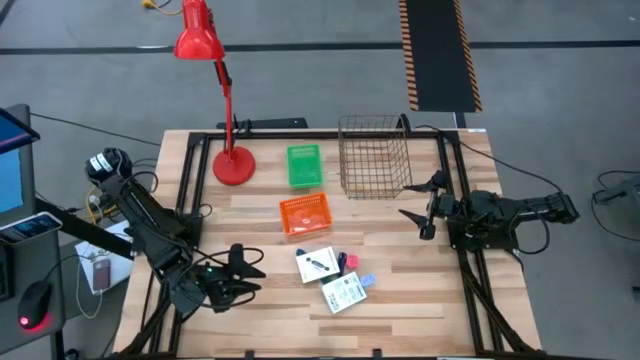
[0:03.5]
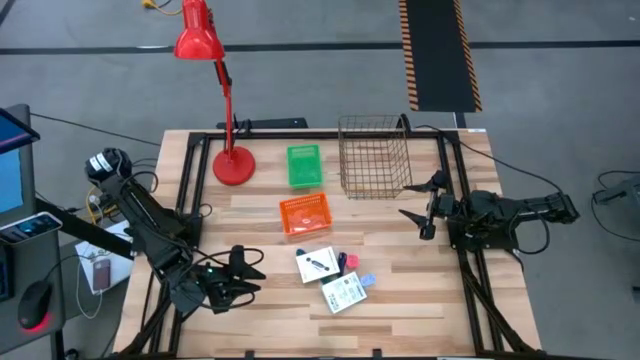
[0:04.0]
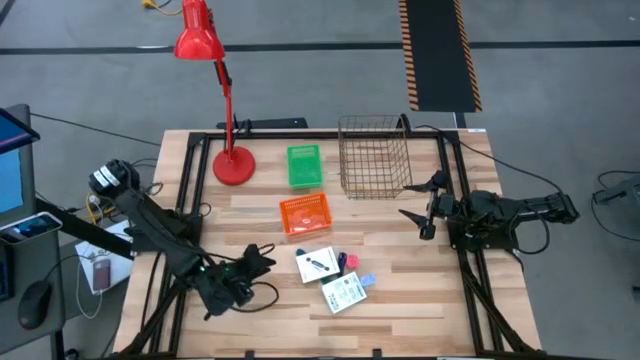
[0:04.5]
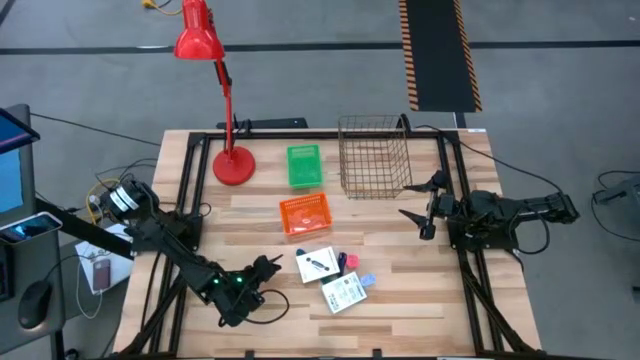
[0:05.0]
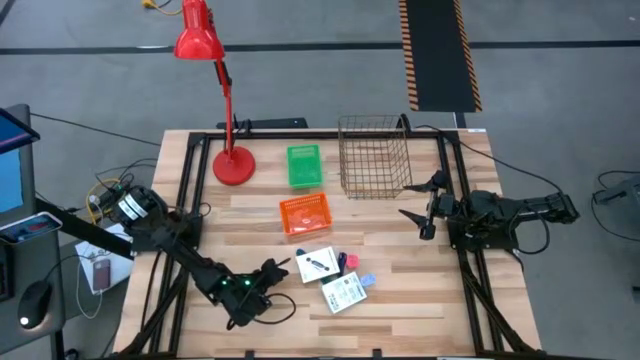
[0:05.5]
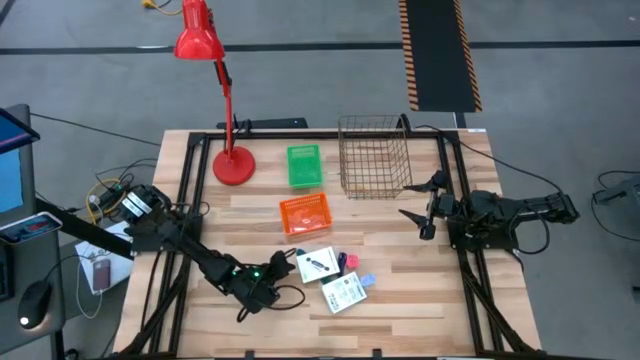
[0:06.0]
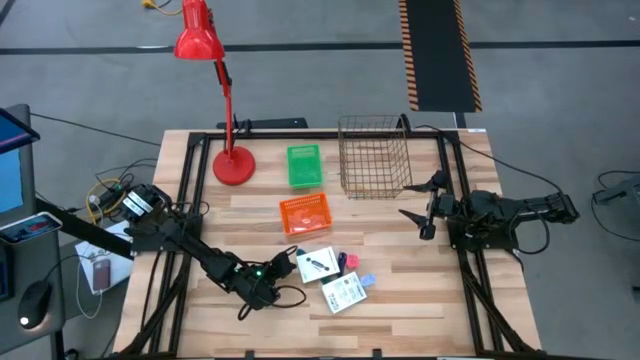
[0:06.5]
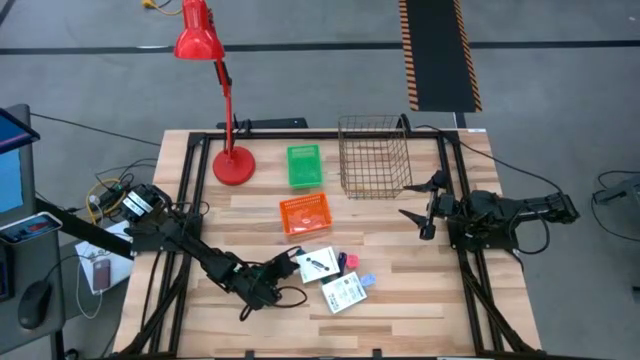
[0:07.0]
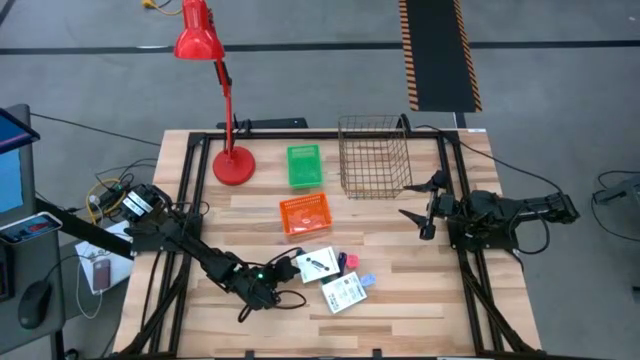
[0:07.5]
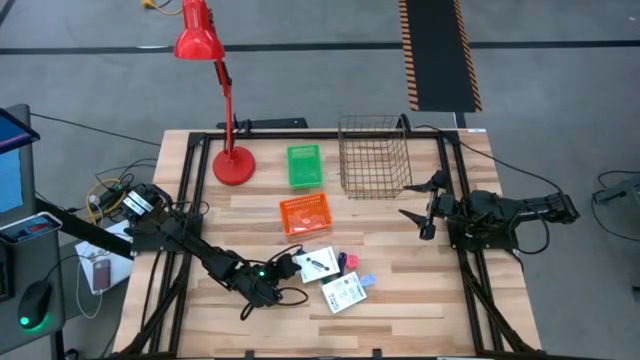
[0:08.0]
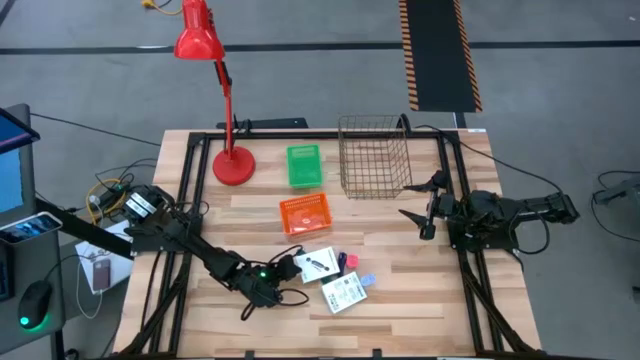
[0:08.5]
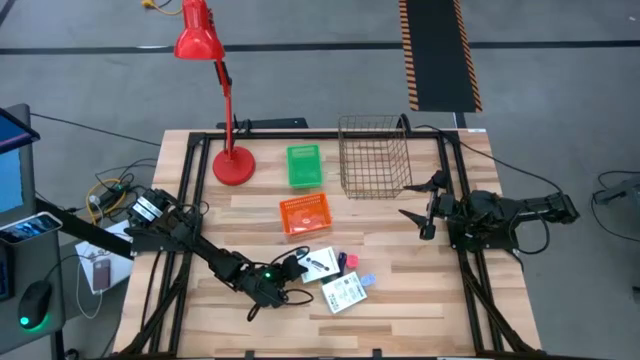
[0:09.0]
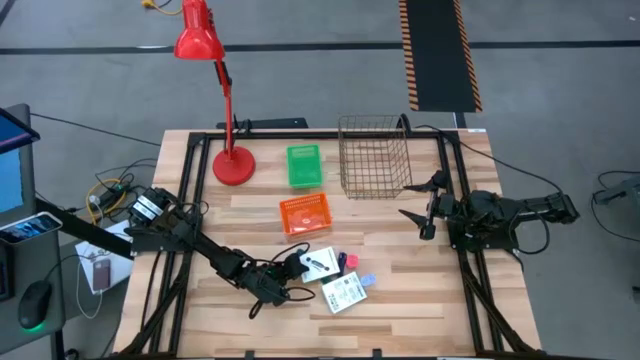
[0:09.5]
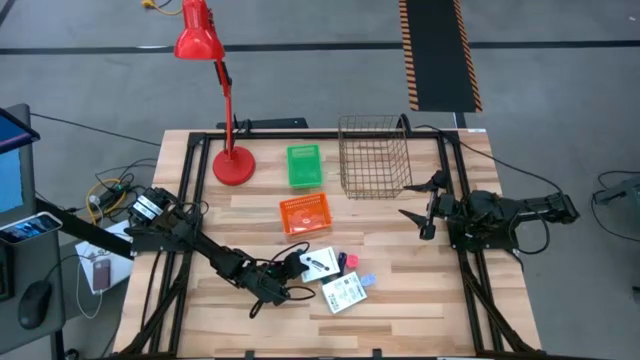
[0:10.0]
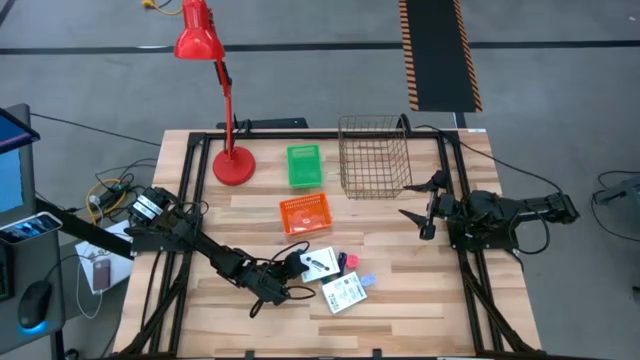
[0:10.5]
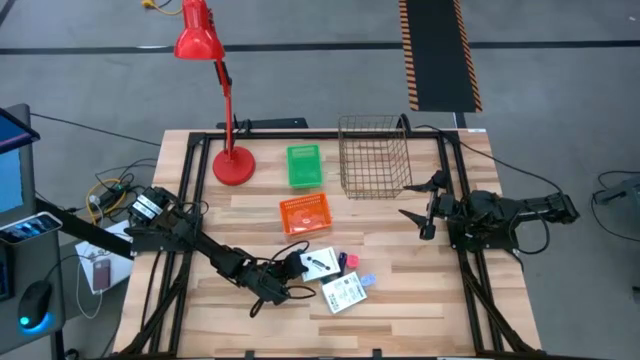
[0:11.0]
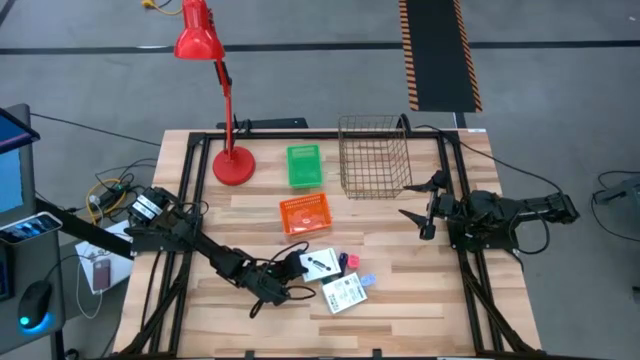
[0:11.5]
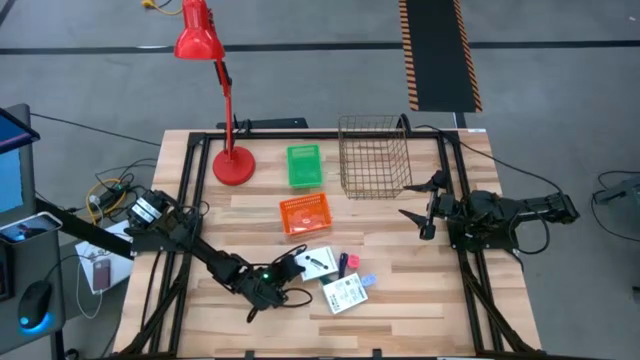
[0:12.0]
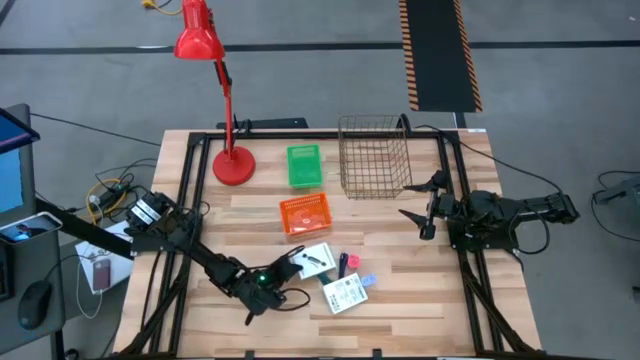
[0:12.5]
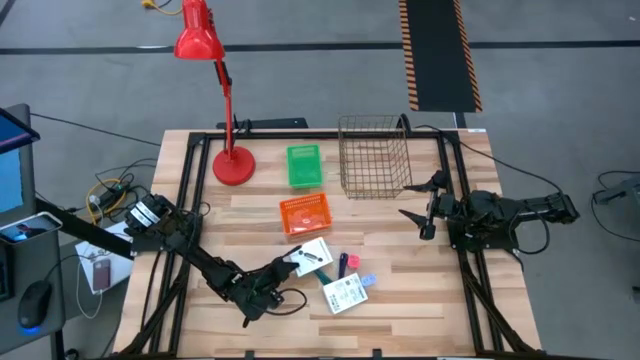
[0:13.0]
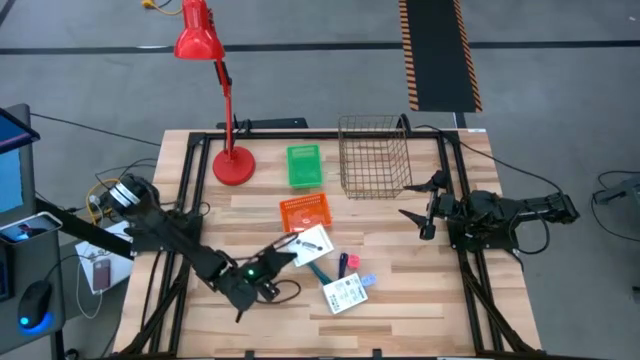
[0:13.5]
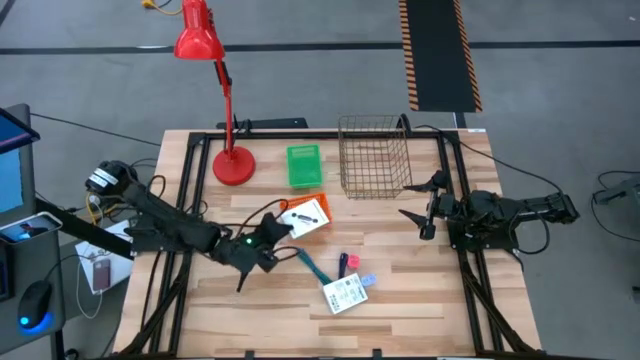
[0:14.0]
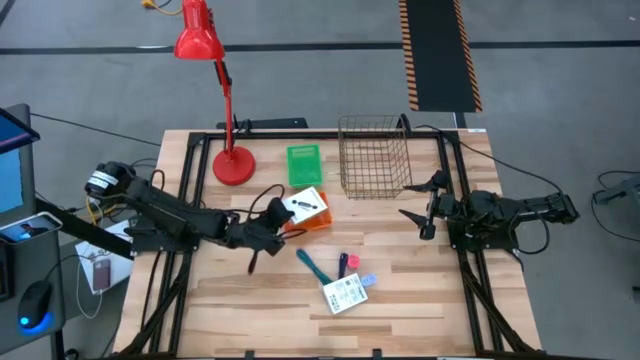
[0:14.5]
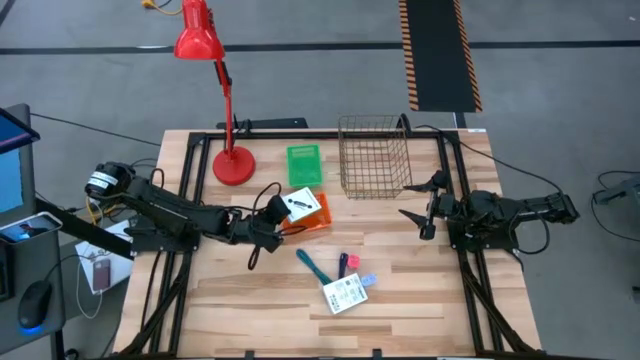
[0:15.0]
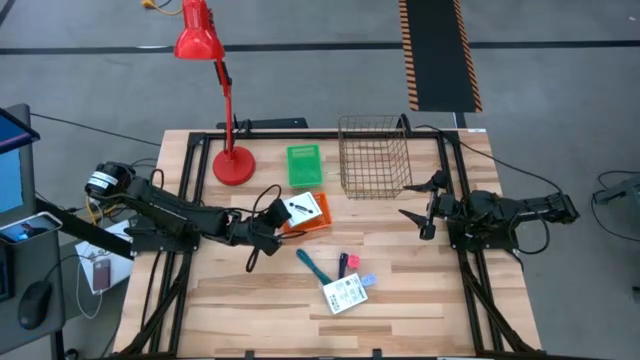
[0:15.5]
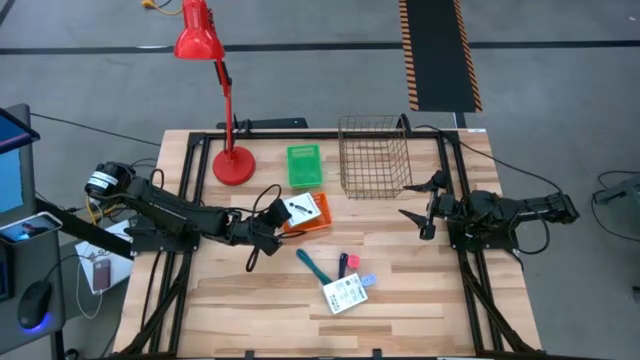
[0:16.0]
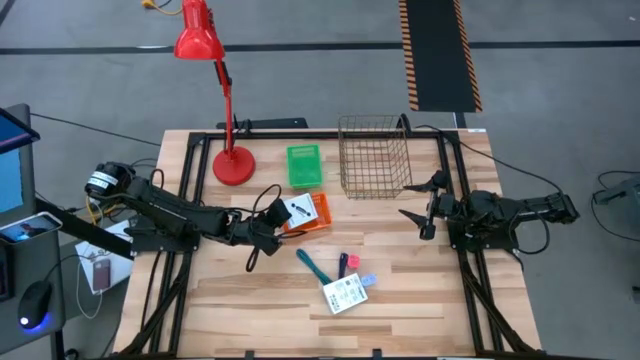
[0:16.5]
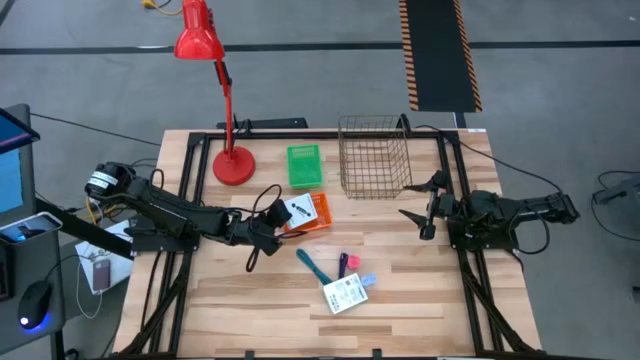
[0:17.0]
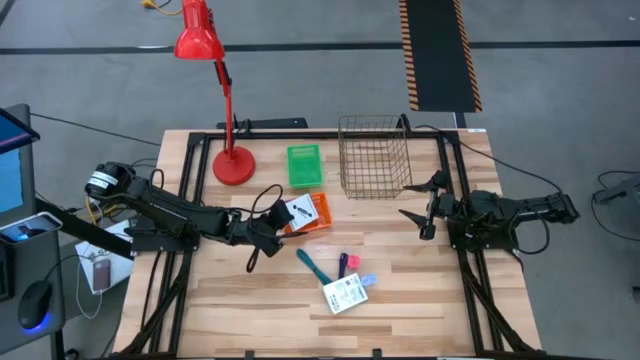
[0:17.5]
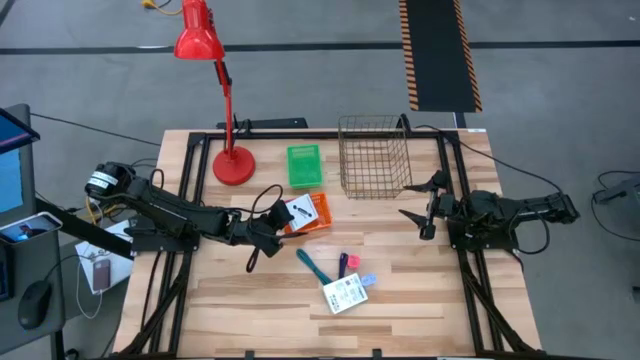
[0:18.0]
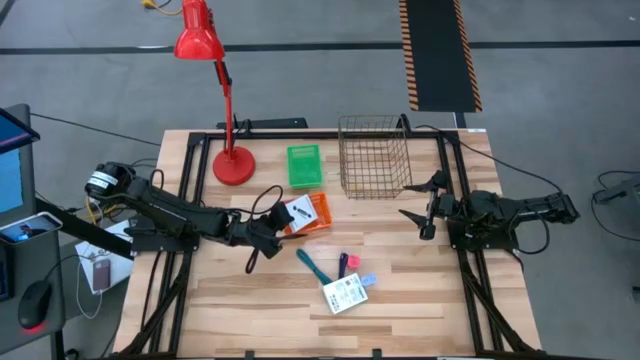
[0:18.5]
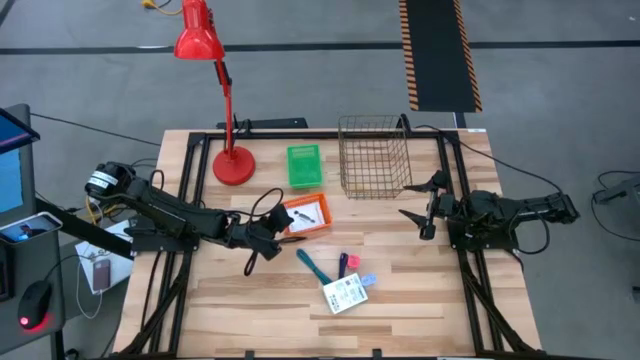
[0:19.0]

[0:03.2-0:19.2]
Task: Pick and place items into bin
Put the top white box into the orange bin

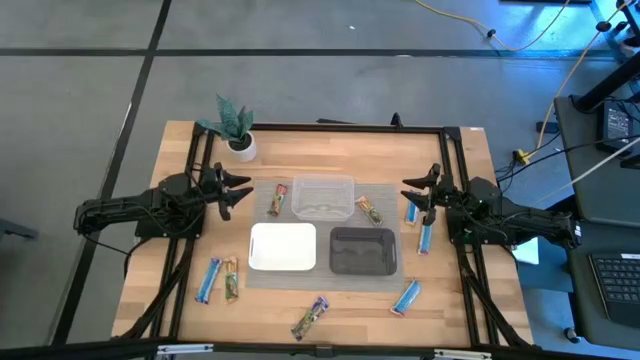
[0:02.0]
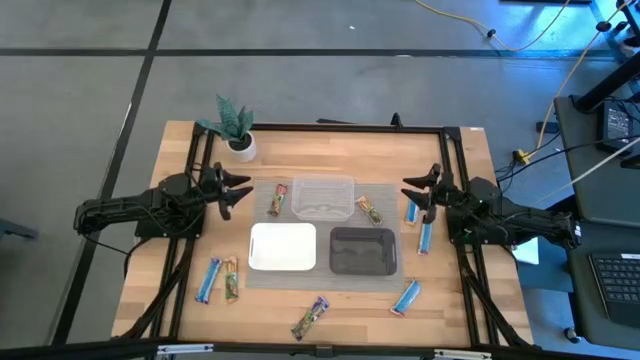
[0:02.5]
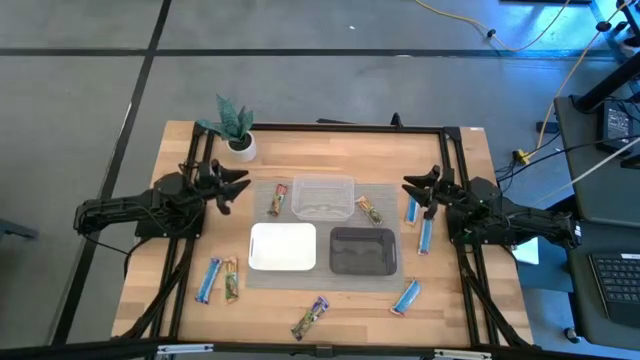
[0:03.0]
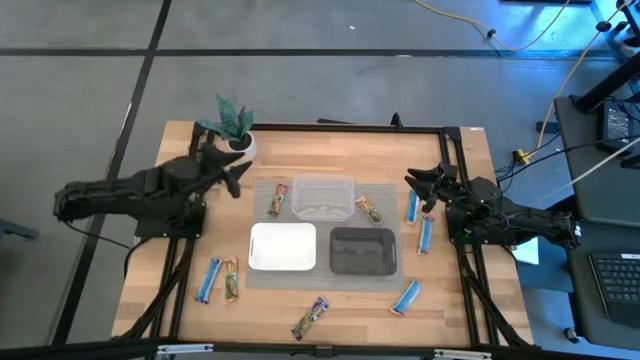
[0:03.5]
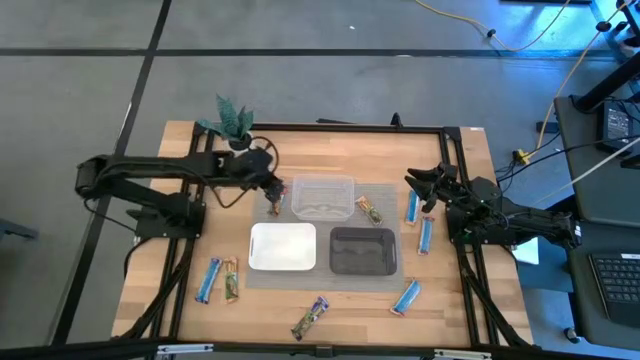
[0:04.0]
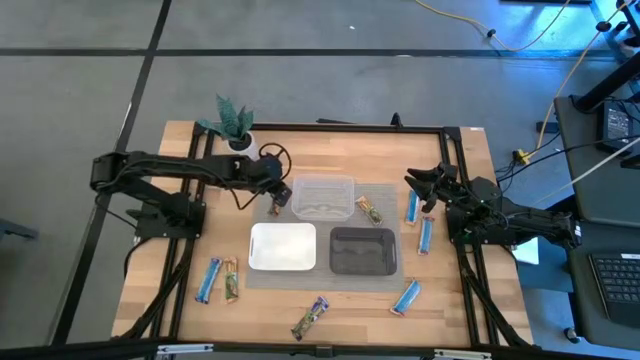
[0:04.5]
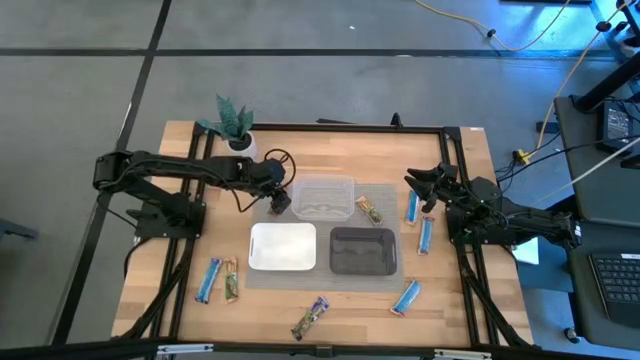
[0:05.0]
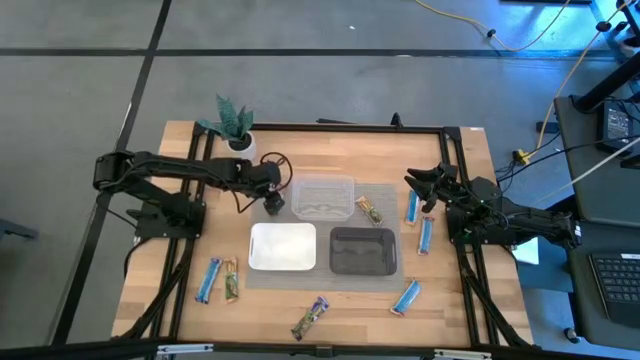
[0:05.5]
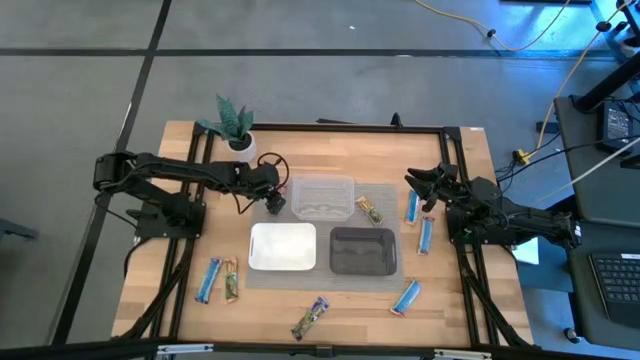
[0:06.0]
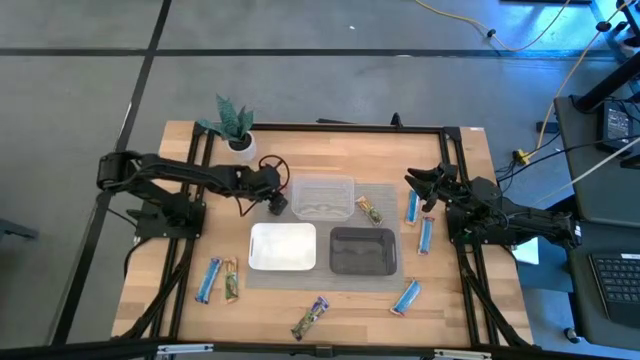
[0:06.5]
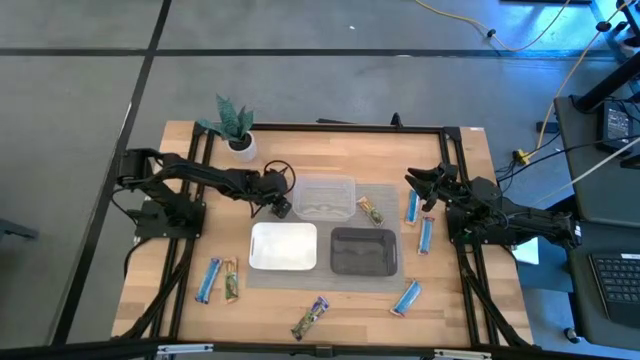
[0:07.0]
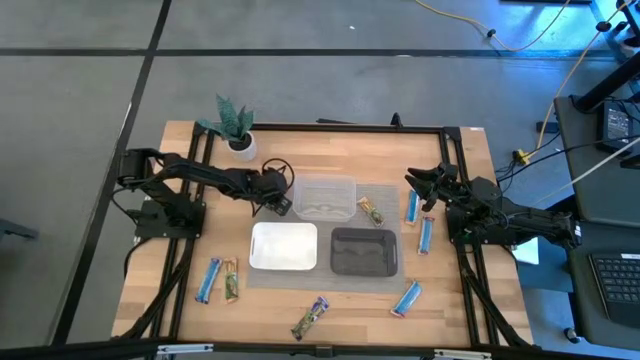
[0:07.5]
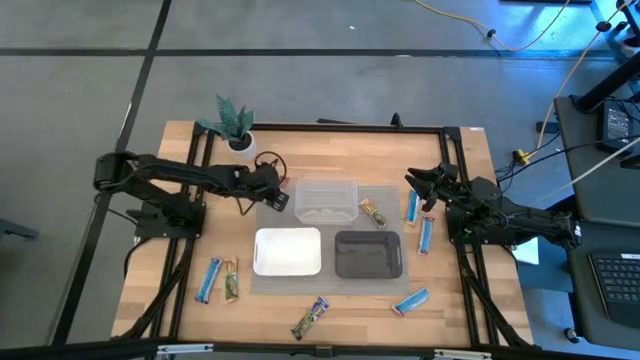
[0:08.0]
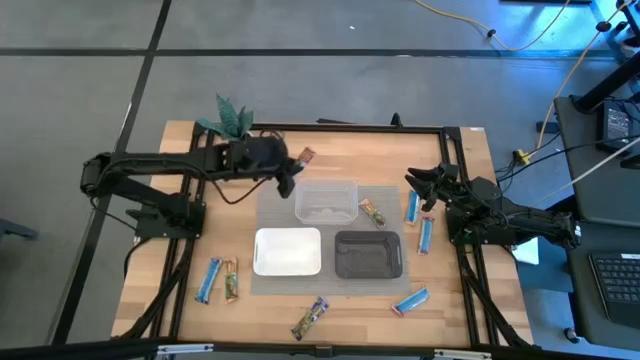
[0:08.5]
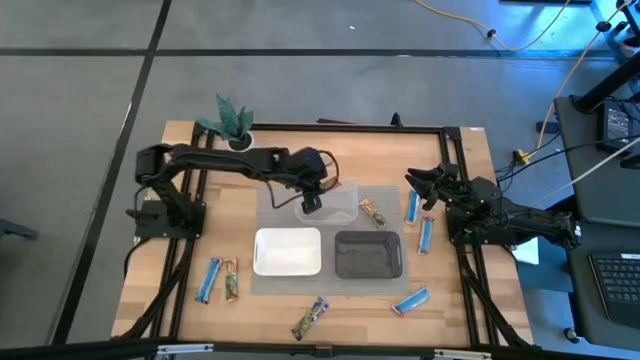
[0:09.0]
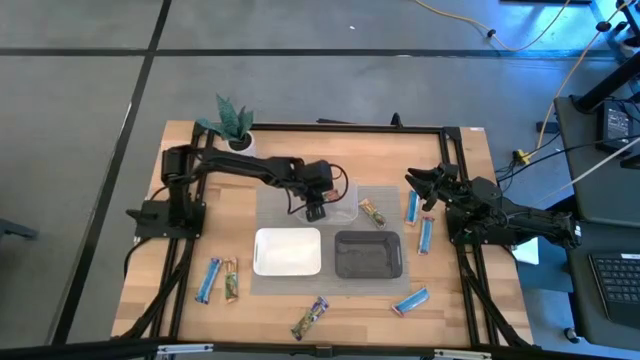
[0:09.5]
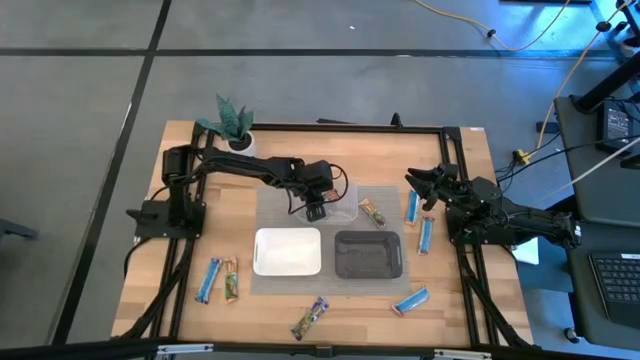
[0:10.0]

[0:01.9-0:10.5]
Task: Pick and place Granola Bars by type
Put the top left red granola bar into the transparent bin
